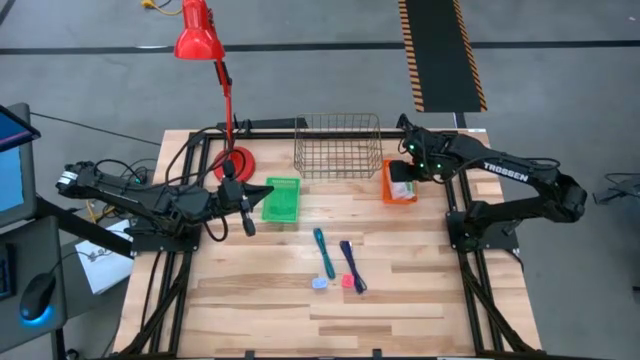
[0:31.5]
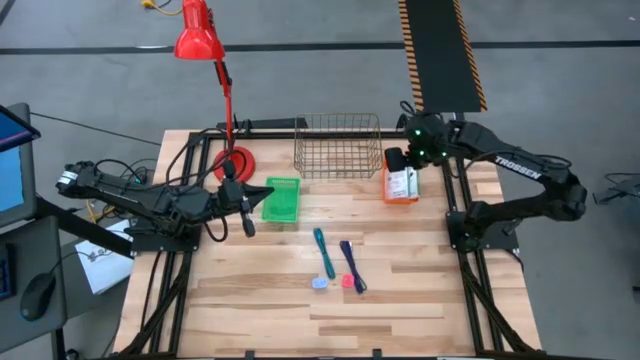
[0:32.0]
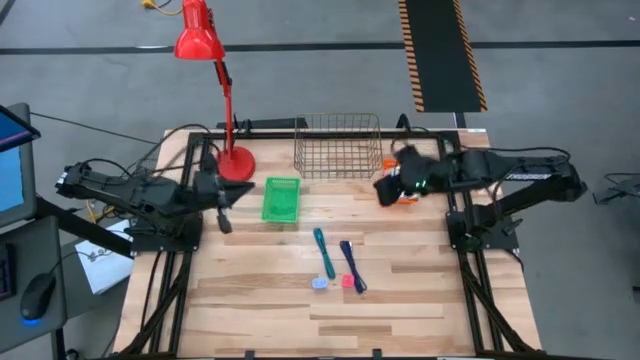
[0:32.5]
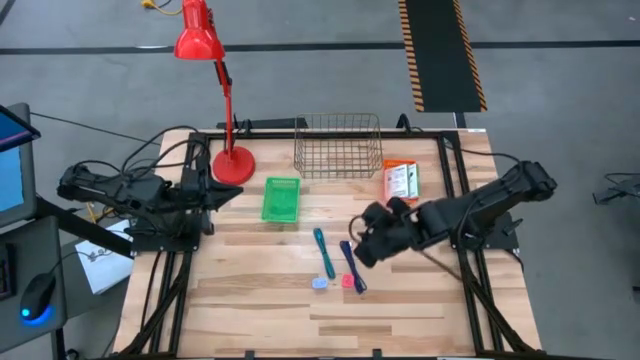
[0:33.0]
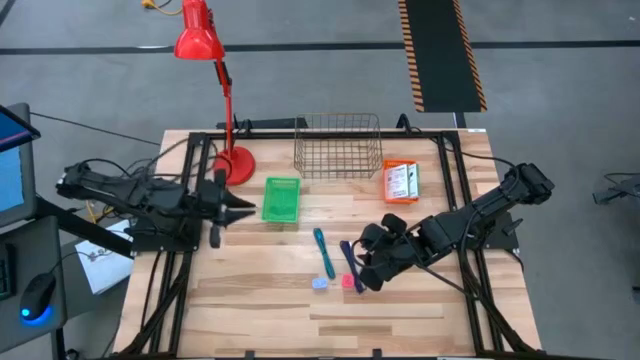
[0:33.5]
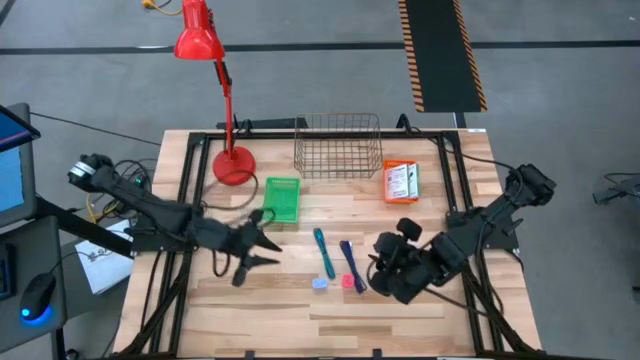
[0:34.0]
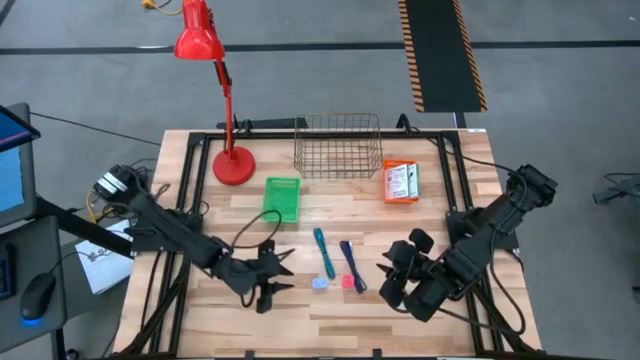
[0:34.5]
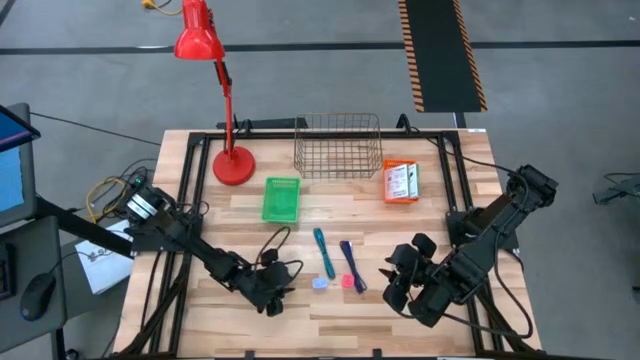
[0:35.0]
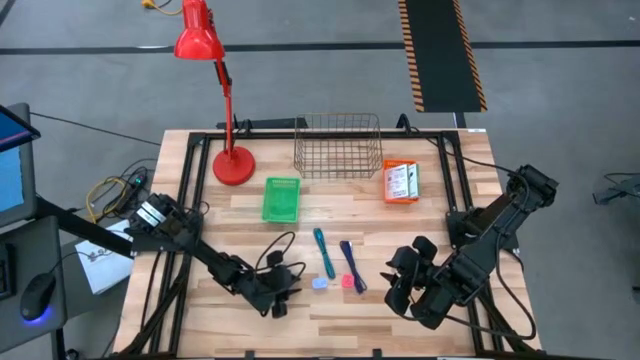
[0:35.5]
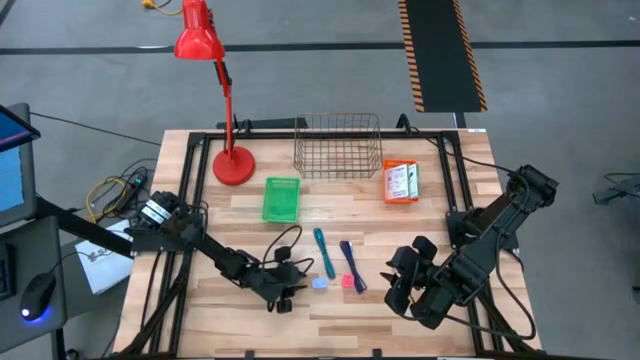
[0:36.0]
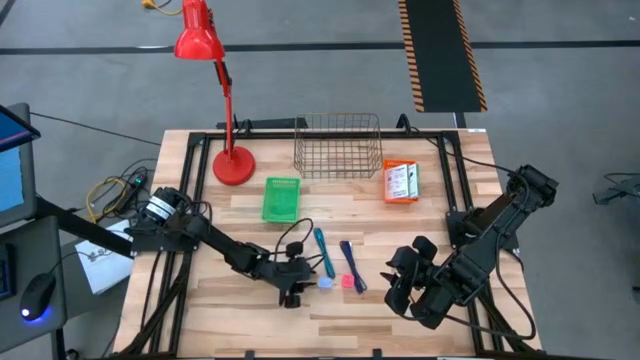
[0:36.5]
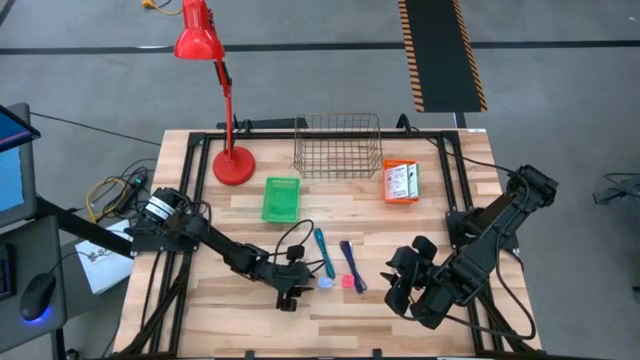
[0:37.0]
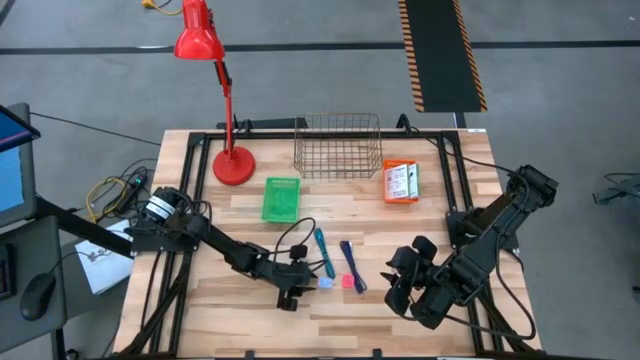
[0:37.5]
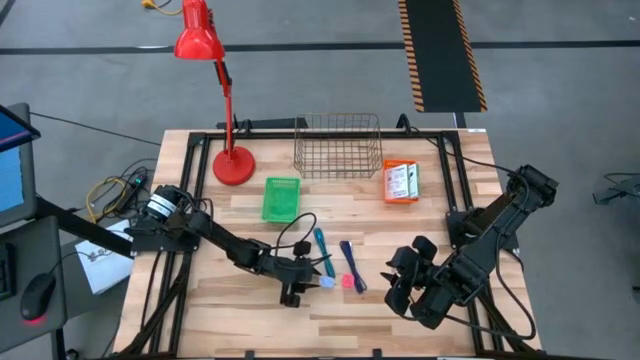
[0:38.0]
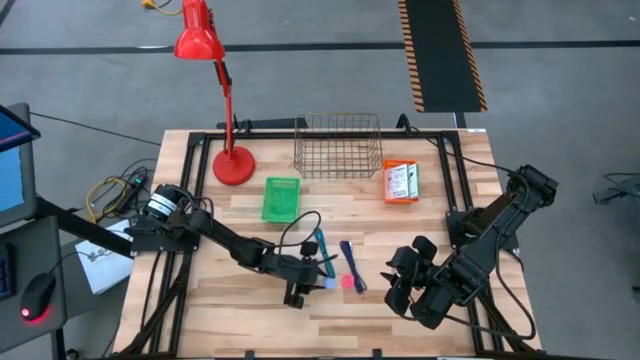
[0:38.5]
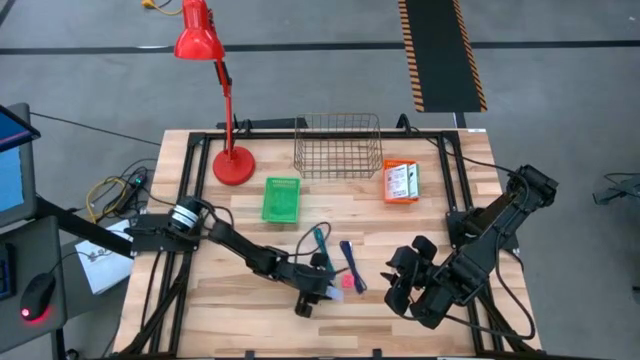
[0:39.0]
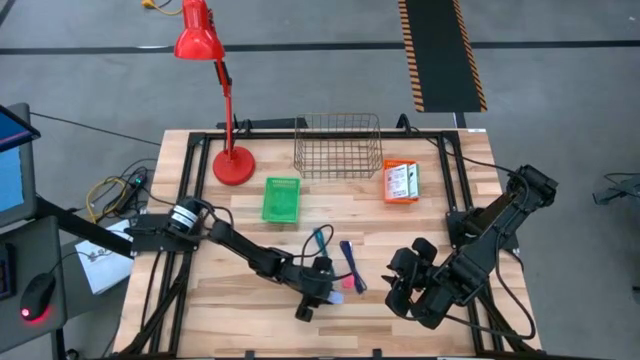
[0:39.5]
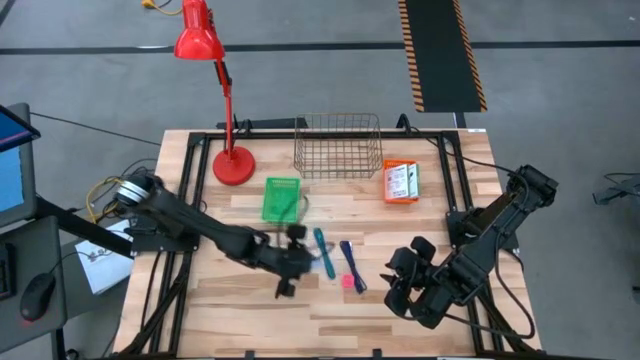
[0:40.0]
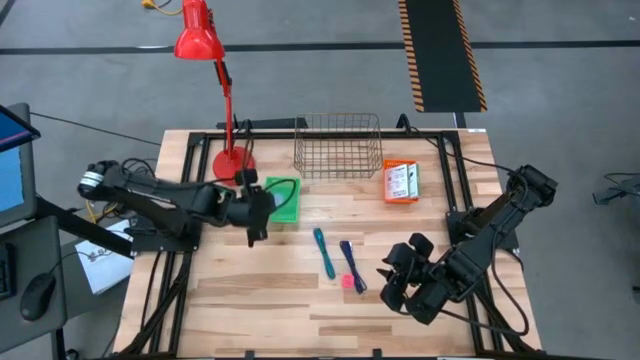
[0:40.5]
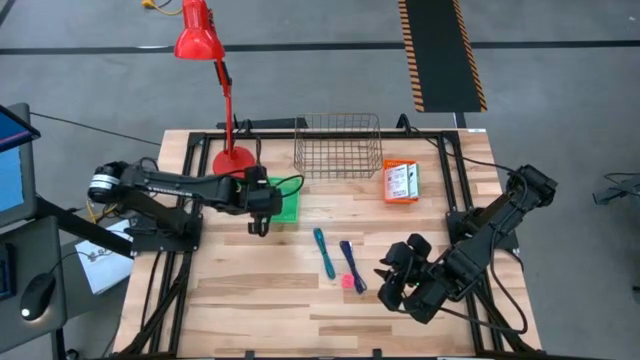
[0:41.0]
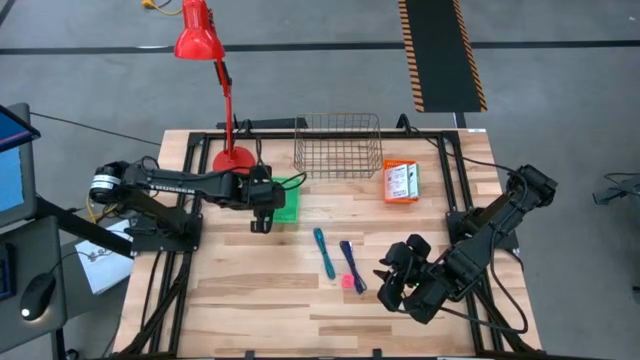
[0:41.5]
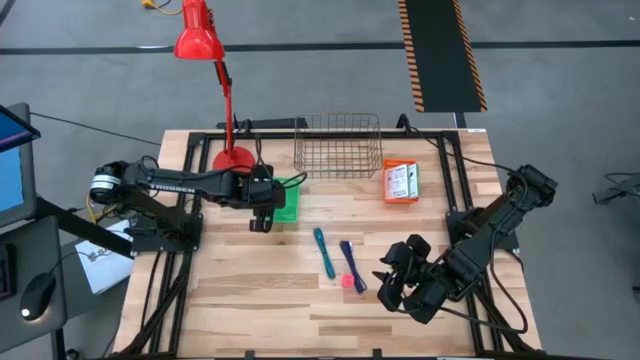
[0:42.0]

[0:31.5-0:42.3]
Task: Pick and place items into bin
Put the white charger adapter into the green basket

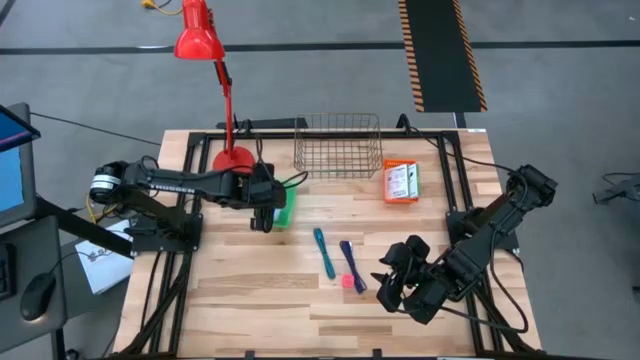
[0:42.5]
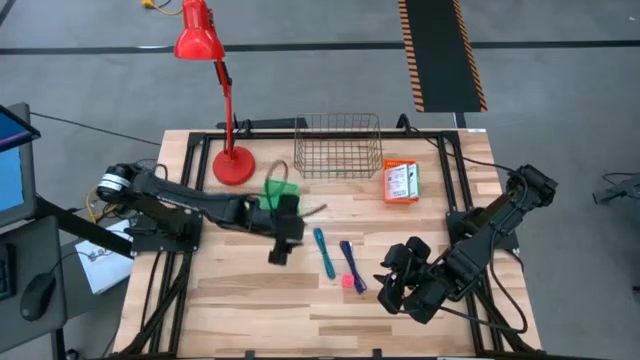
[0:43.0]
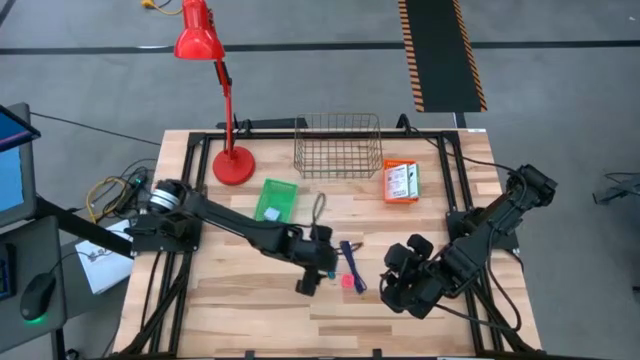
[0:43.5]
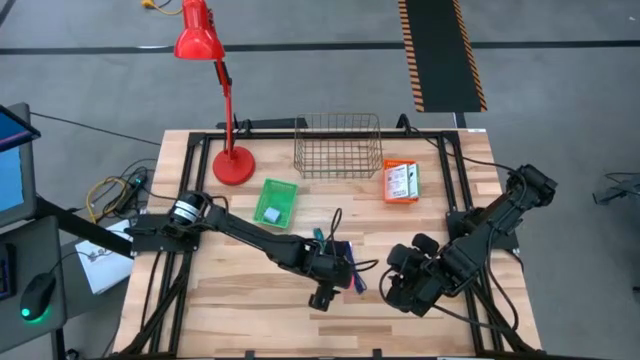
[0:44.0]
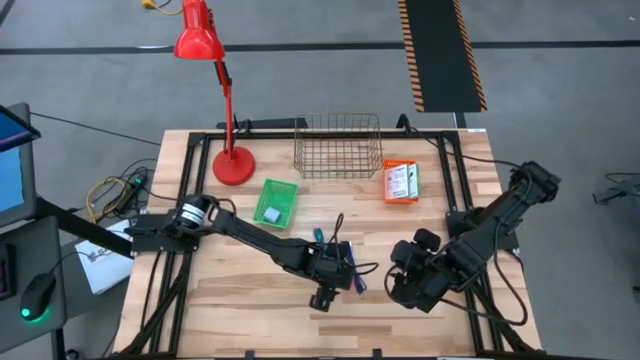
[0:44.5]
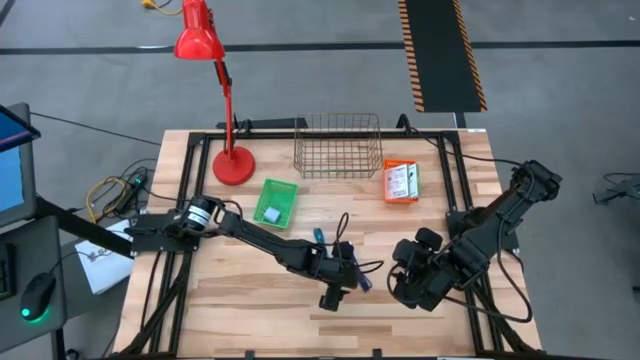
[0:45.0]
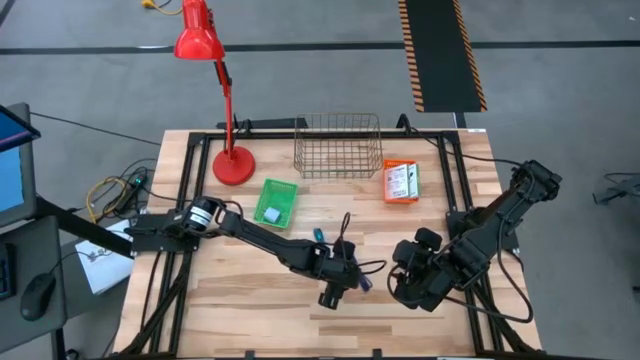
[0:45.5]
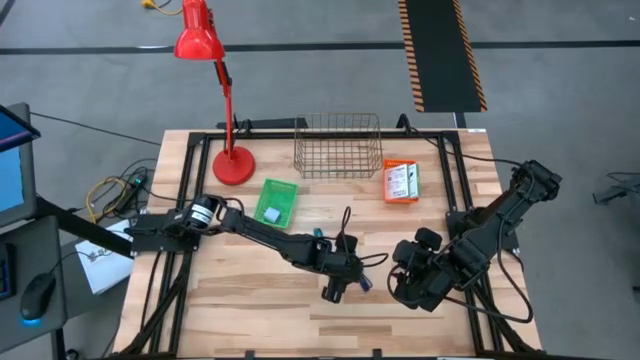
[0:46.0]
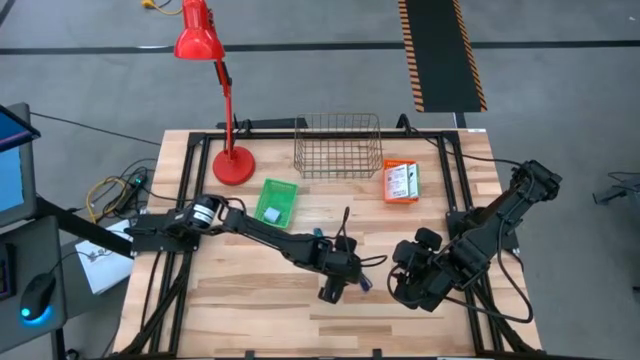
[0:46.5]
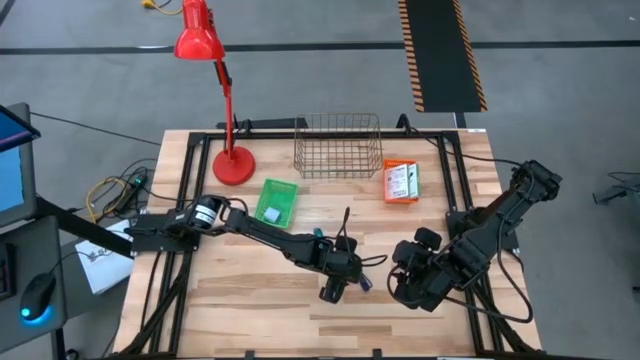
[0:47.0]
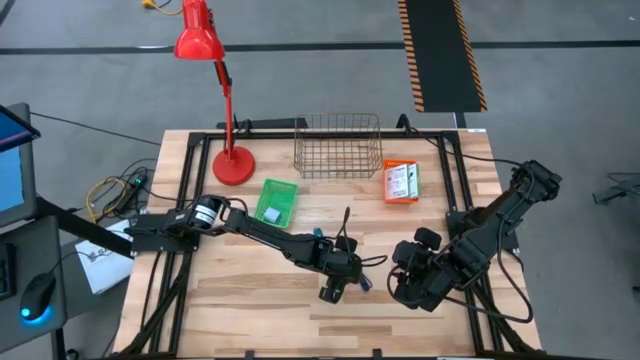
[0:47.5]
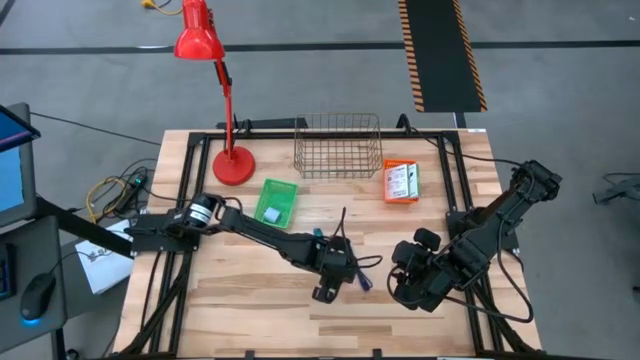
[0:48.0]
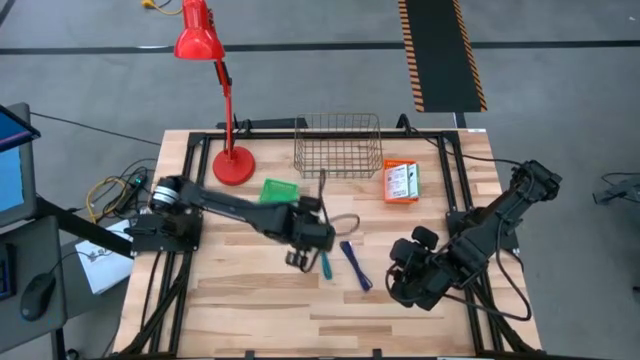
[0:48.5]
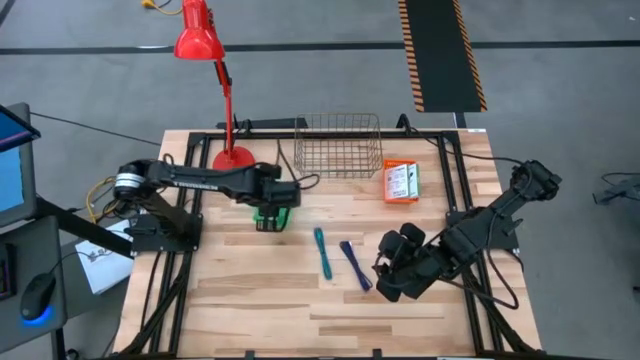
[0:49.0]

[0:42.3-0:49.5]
Put the pink charger adapter into the green basket

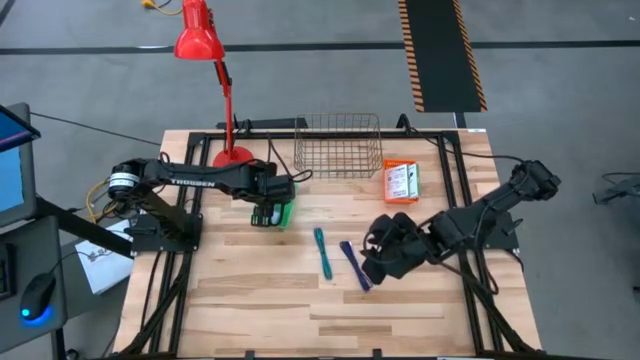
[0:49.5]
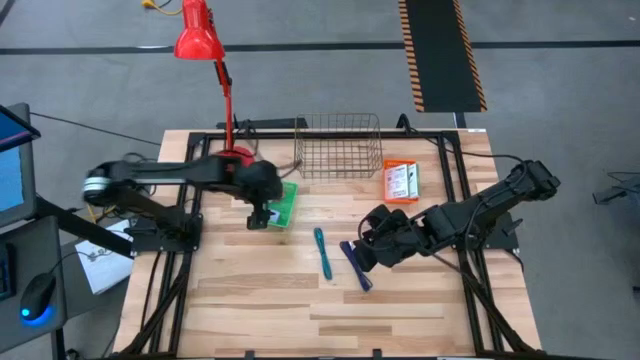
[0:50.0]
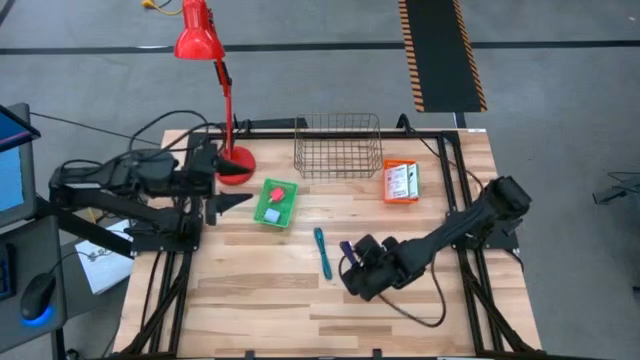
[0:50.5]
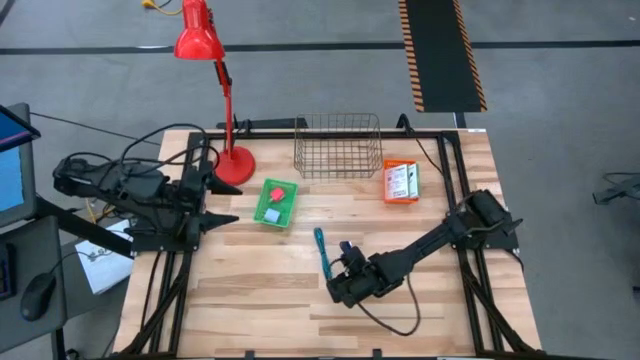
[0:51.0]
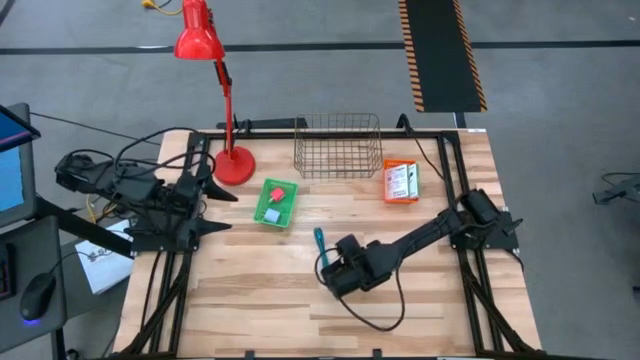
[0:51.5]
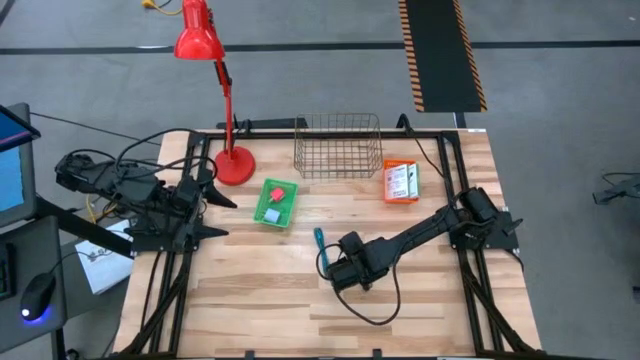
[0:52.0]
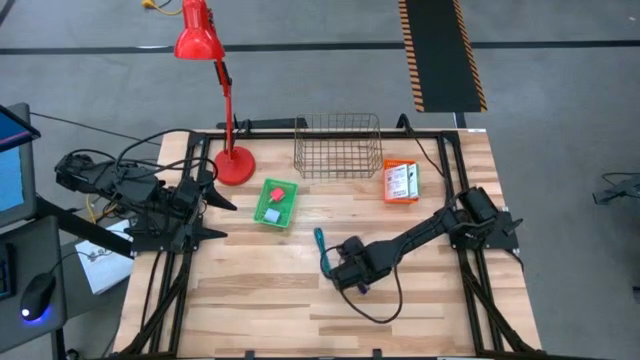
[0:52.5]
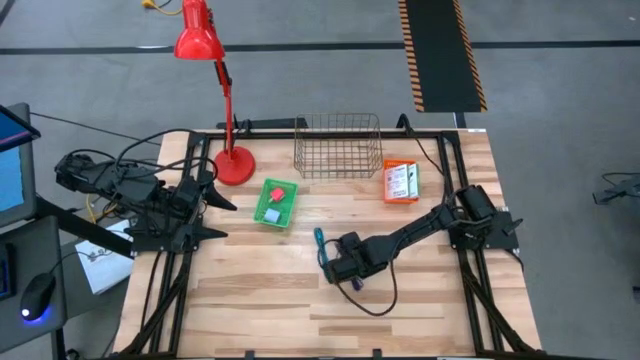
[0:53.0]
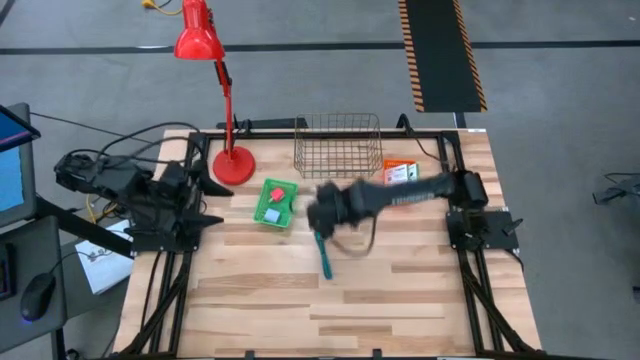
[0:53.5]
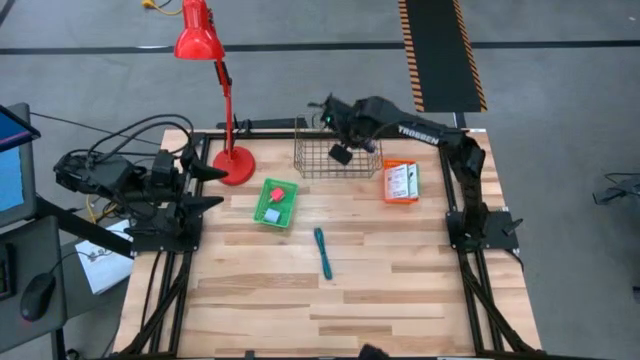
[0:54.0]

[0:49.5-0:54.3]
Put the violet charger cable into the wire basket
